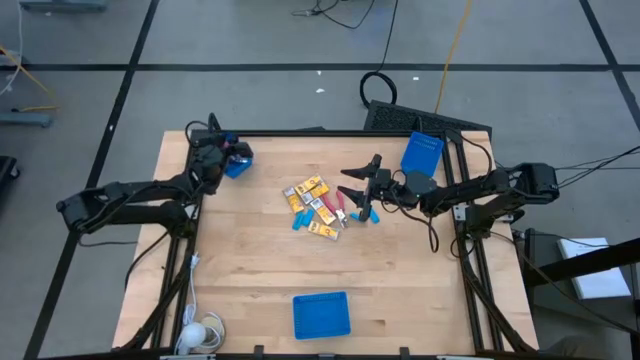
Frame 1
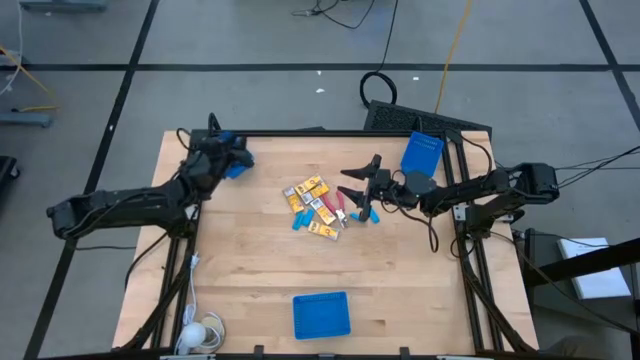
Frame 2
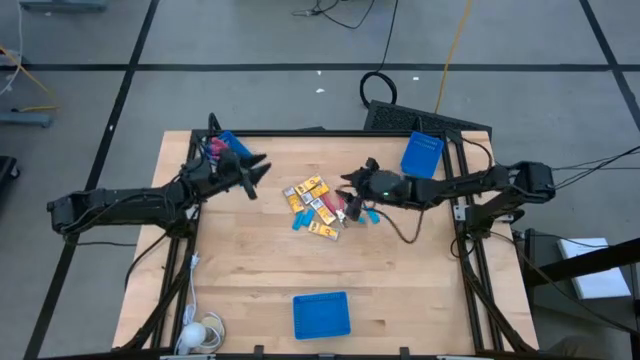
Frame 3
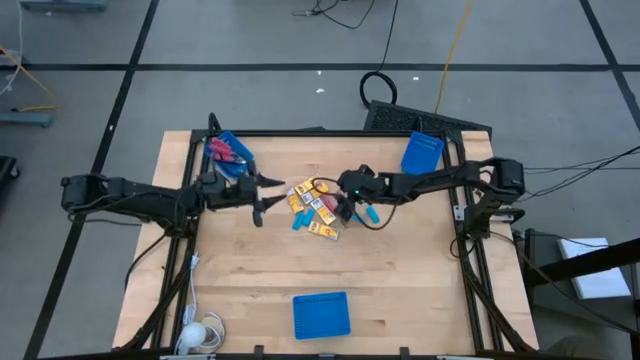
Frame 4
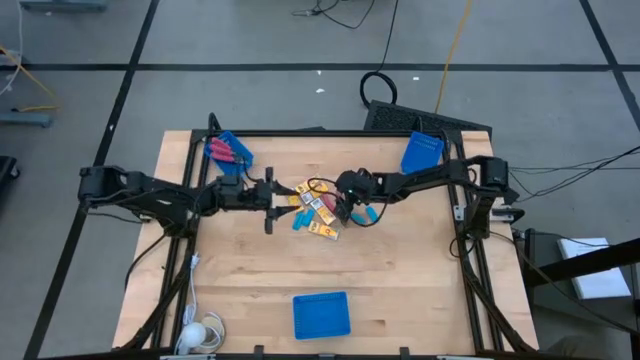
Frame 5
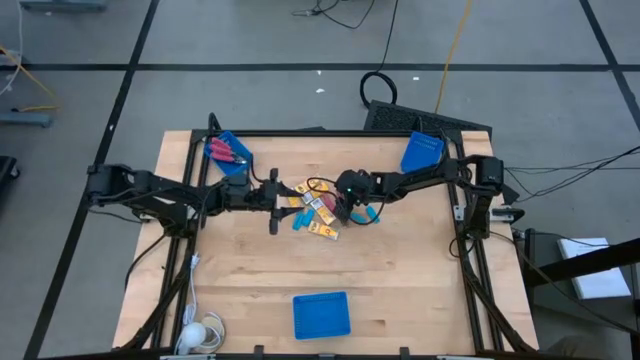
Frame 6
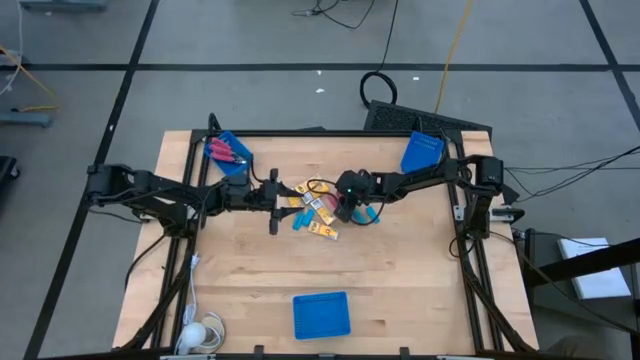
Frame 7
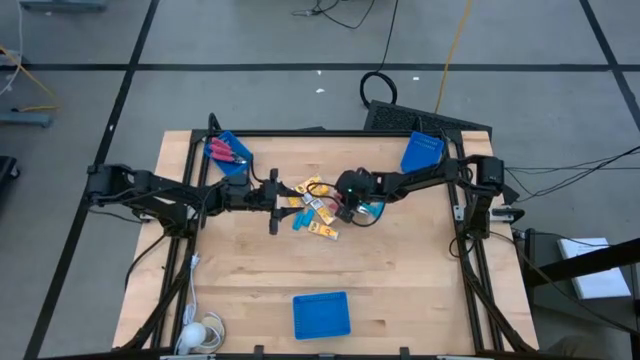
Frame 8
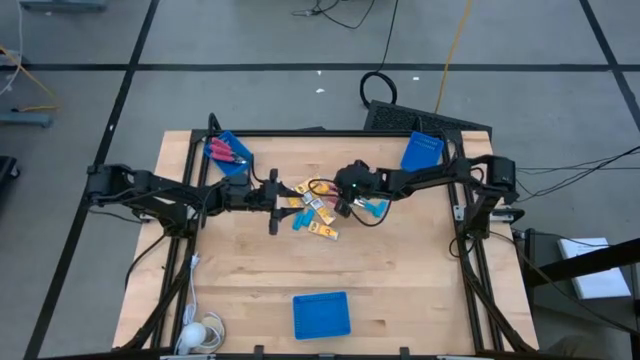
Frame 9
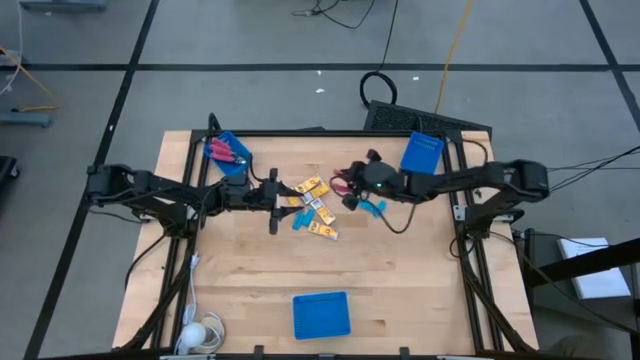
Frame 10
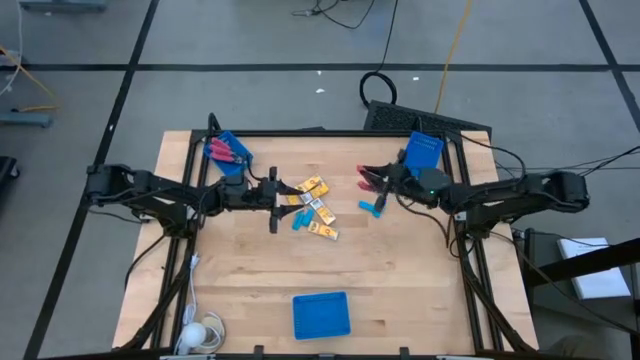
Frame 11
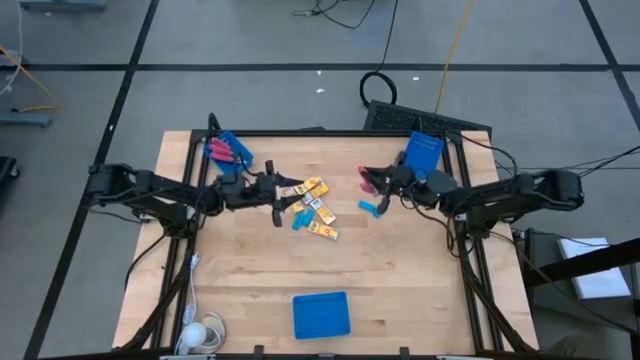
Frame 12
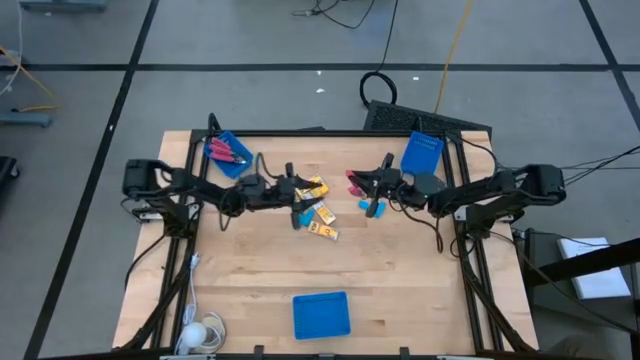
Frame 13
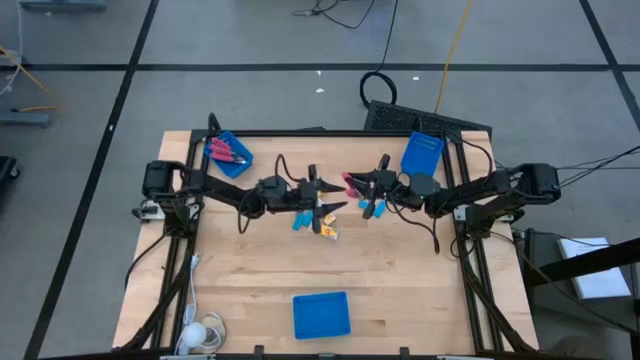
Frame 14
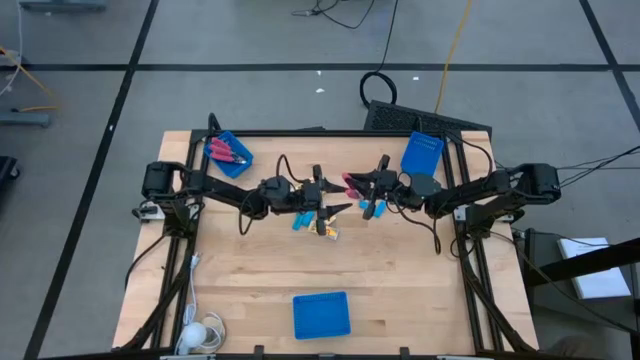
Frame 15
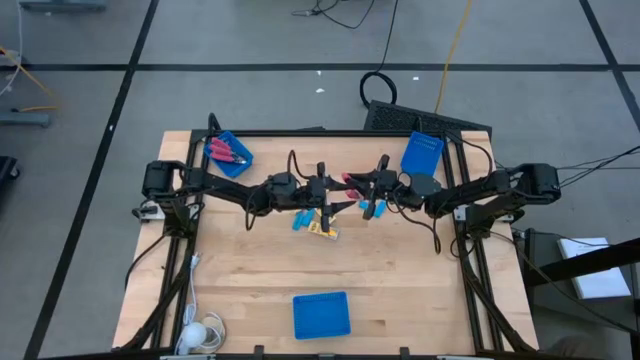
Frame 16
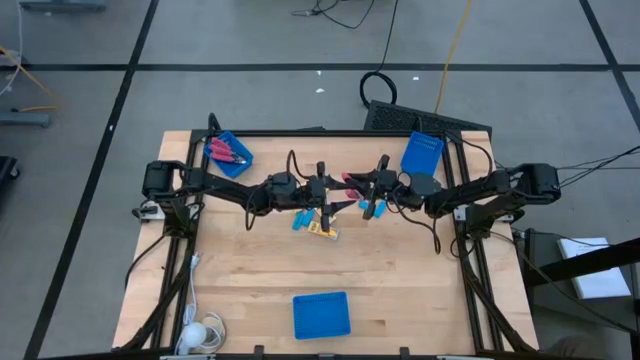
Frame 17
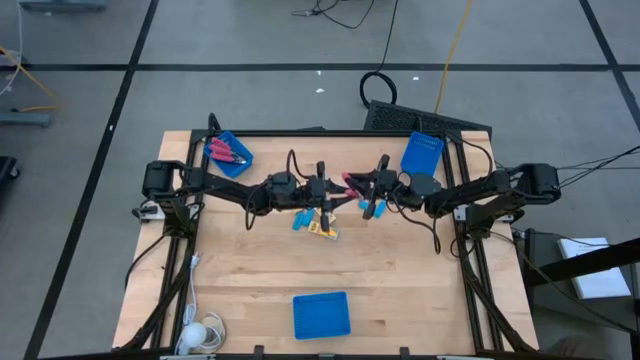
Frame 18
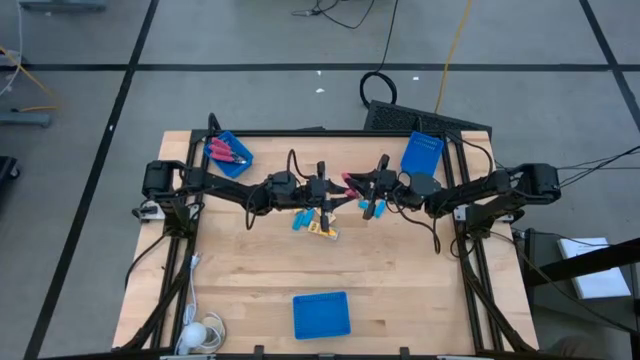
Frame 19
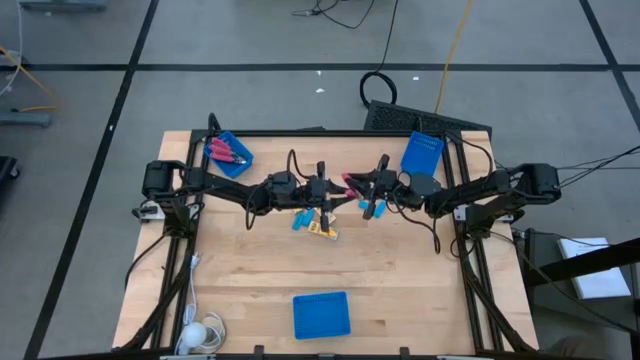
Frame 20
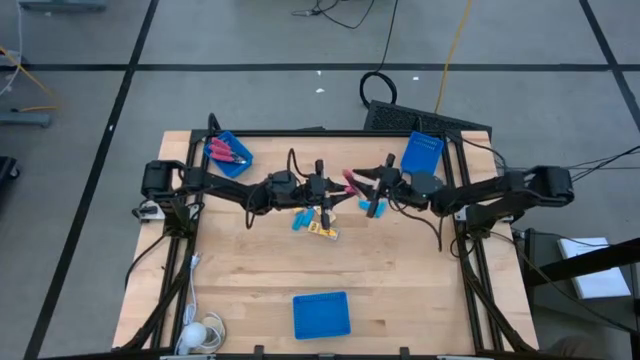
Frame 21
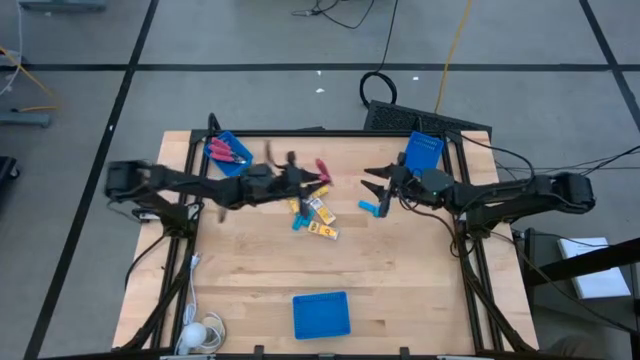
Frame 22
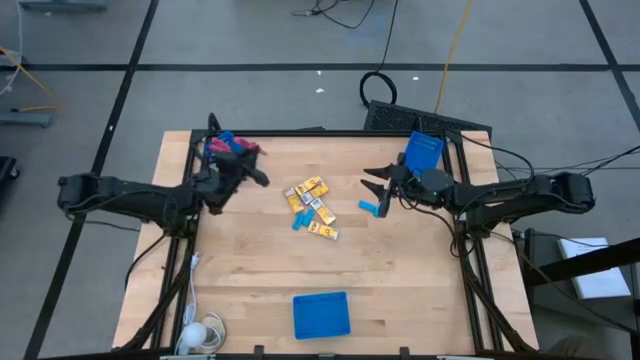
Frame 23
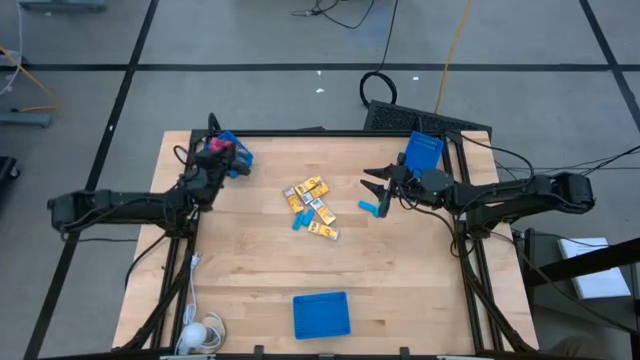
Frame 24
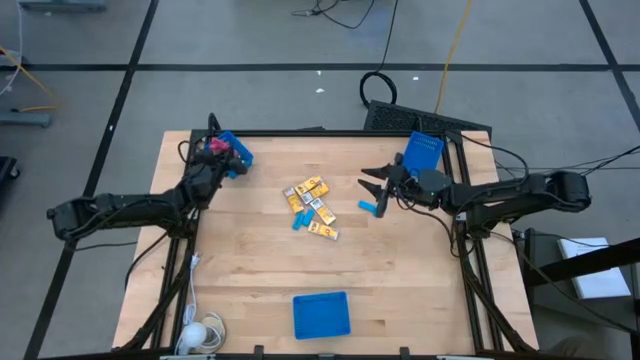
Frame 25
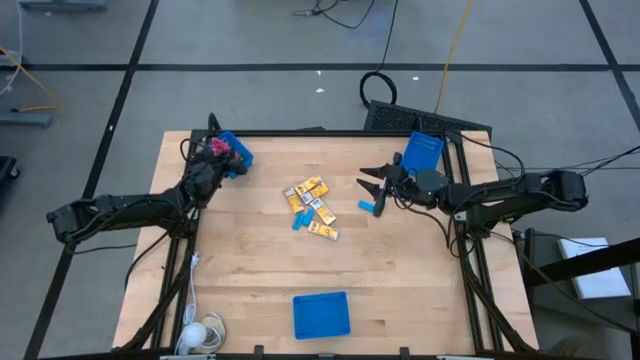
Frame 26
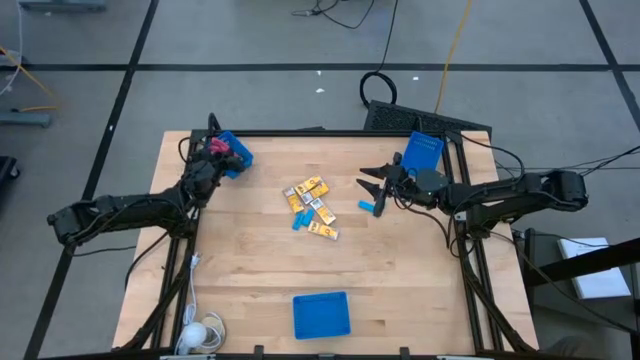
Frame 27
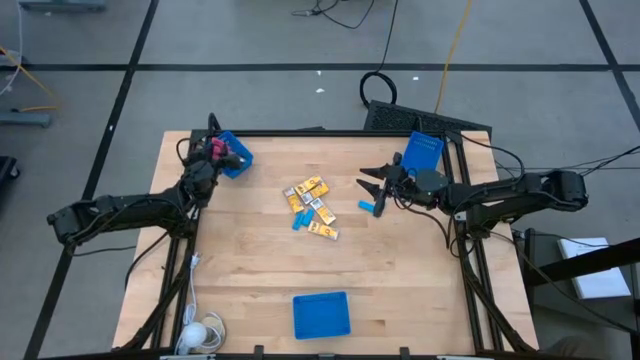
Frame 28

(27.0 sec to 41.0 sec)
Task: Pick & Place School Supplies
Put the pink ticket punch into the left blue bin

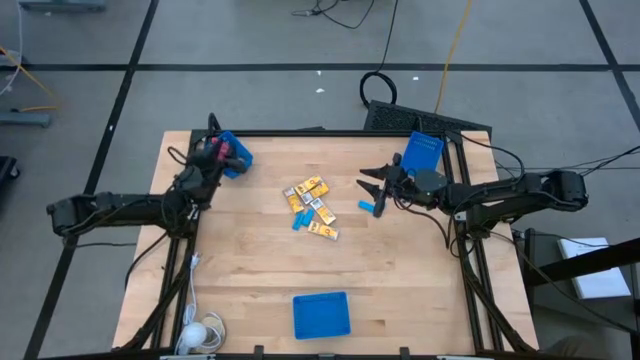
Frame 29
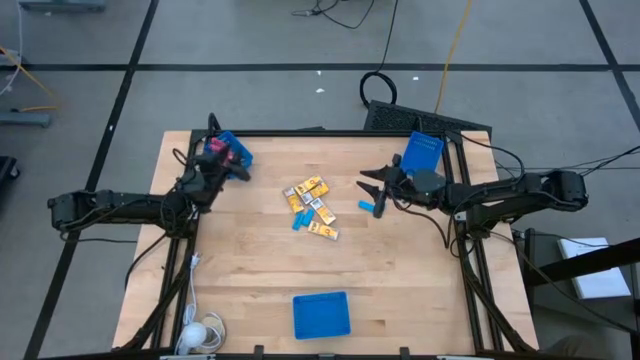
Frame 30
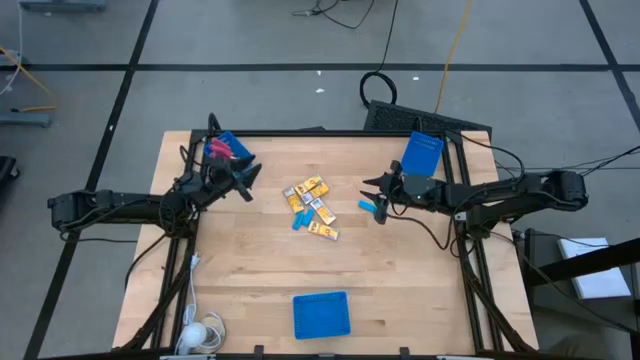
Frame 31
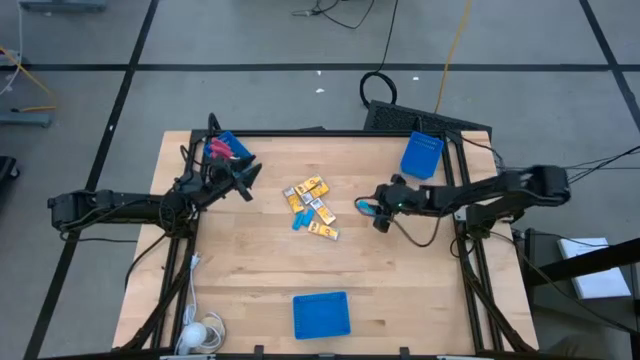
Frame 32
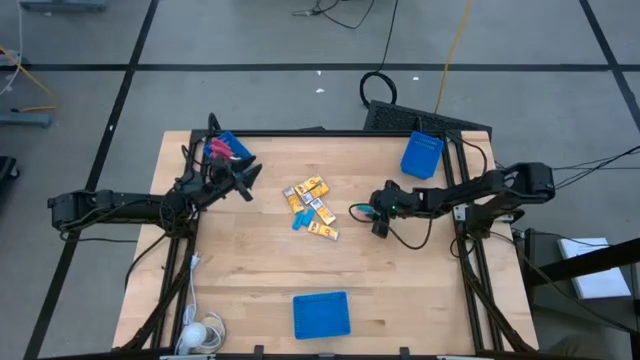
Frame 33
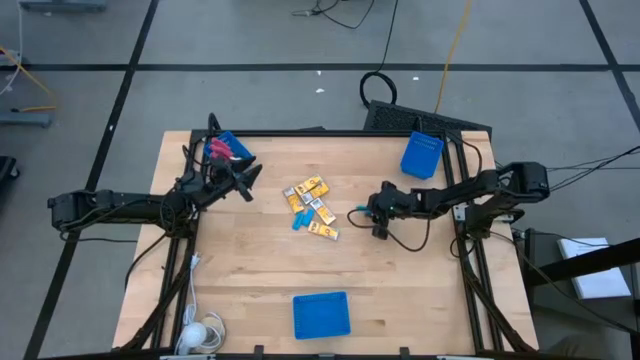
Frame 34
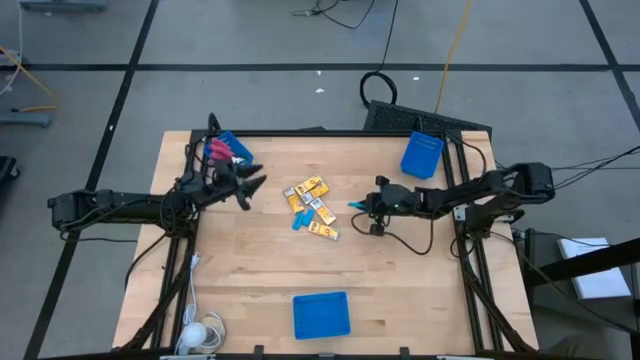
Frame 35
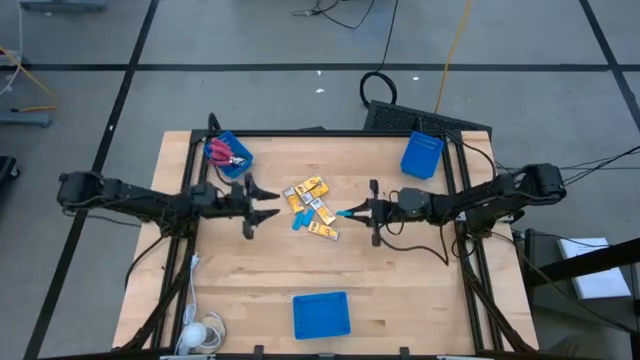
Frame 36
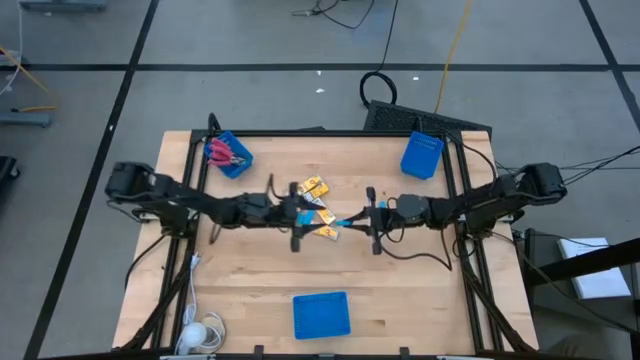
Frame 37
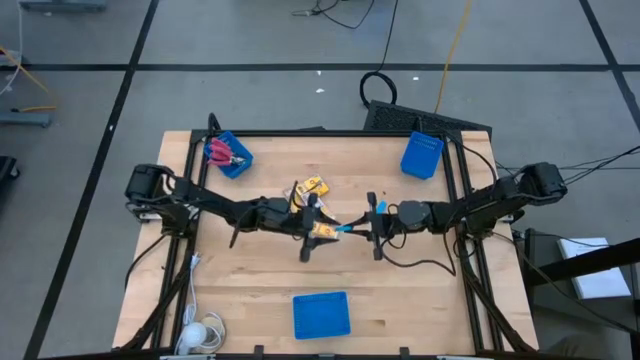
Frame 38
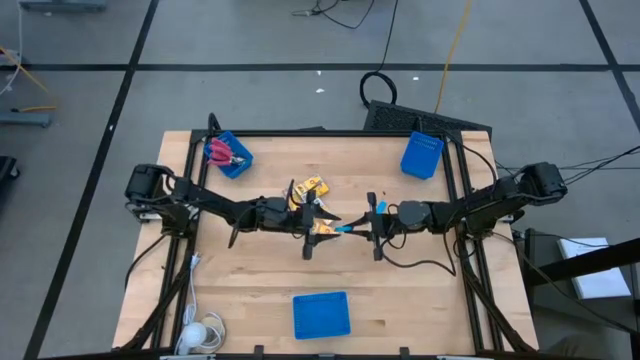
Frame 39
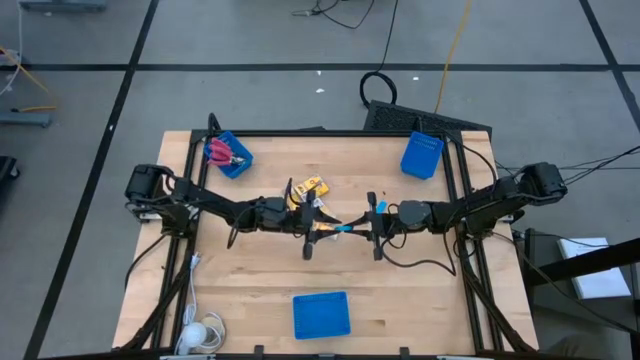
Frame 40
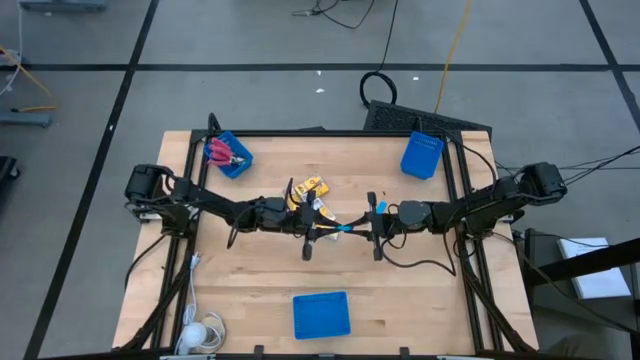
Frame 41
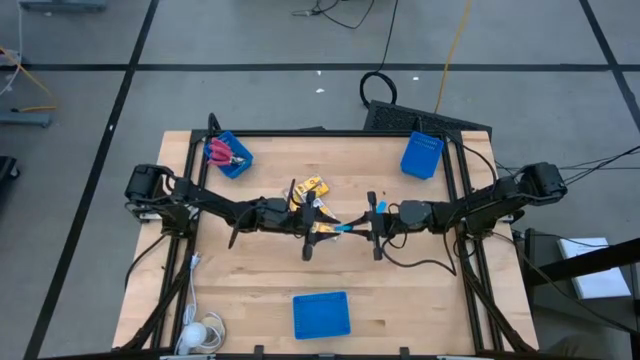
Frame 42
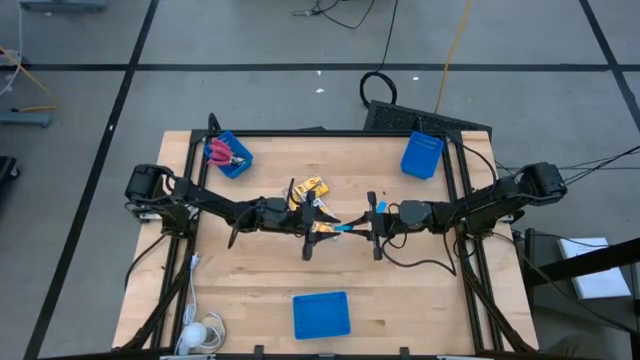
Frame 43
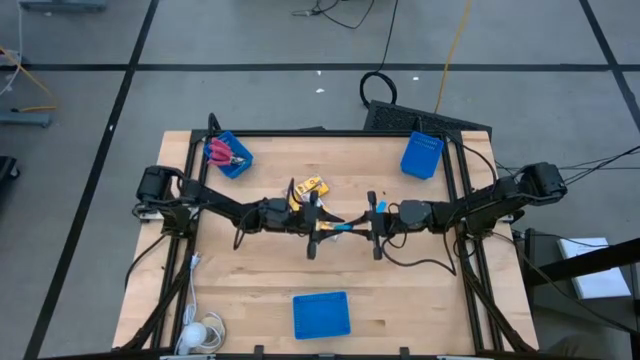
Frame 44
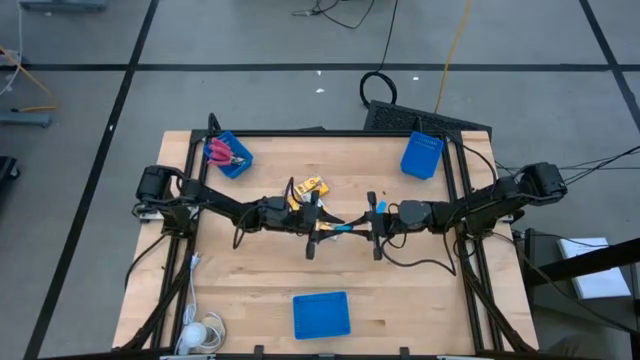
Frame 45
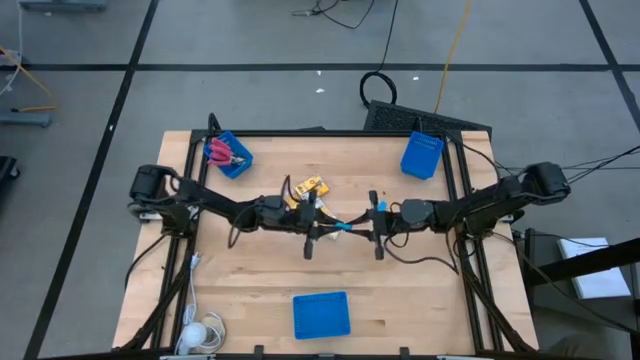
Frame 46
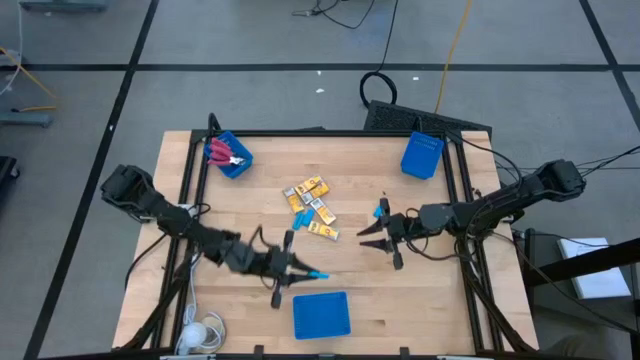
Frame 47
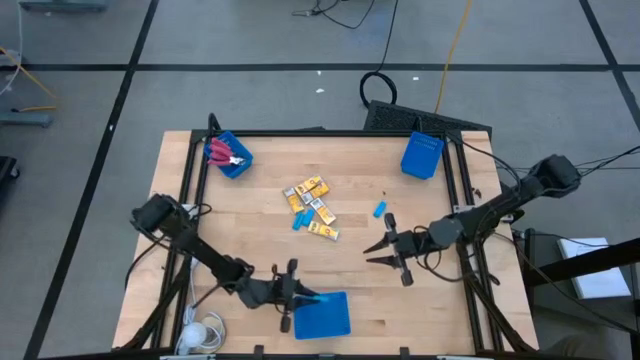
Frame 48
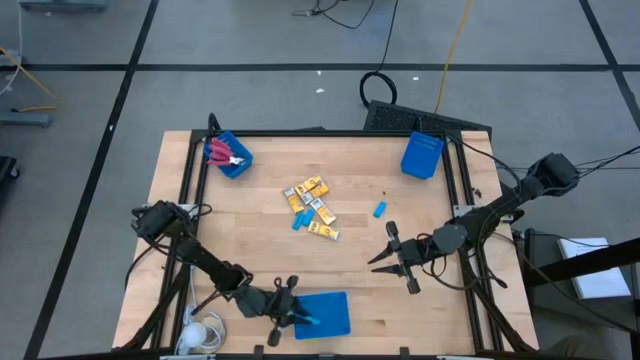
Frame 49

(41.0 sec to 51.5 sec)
Put the blue eraser into the bottom blue bin
